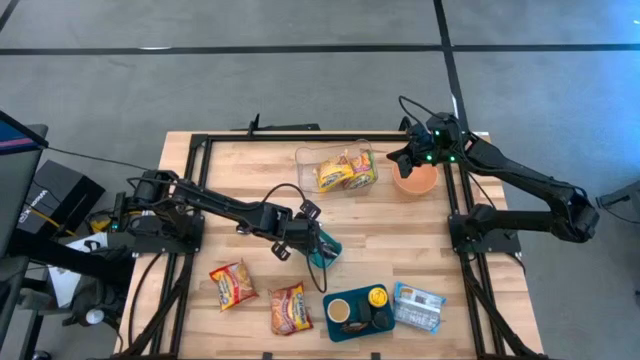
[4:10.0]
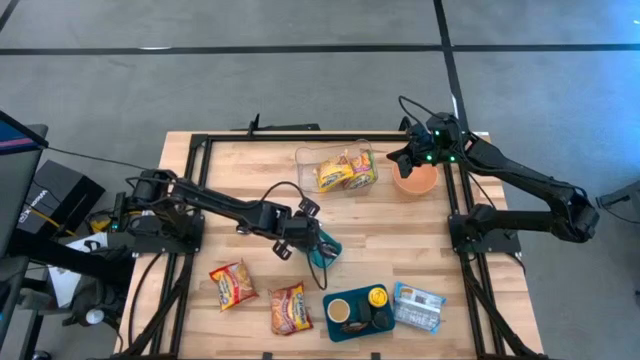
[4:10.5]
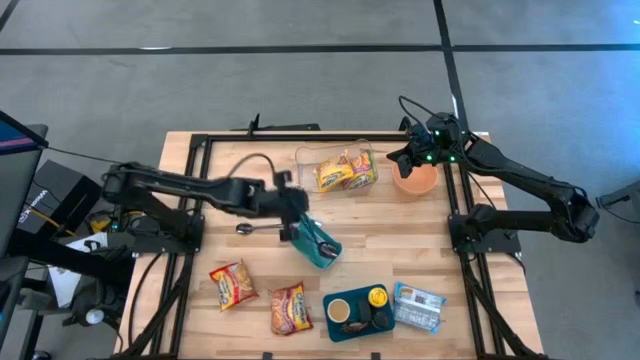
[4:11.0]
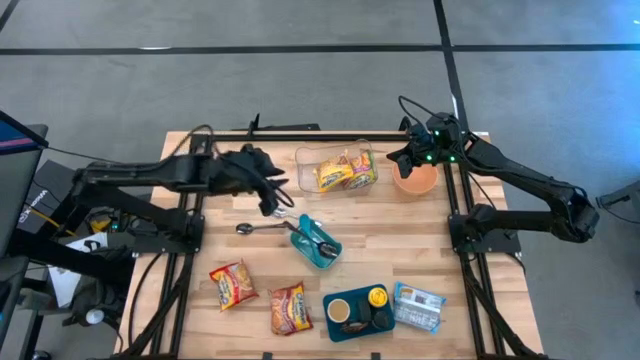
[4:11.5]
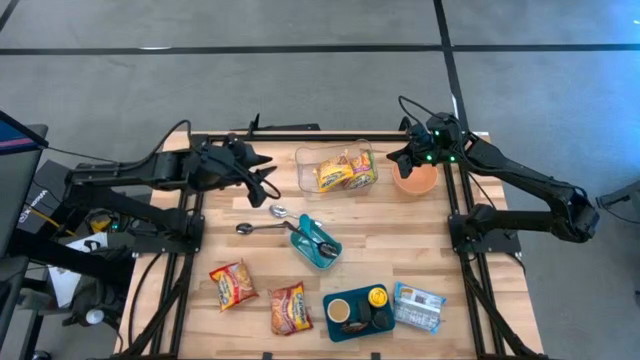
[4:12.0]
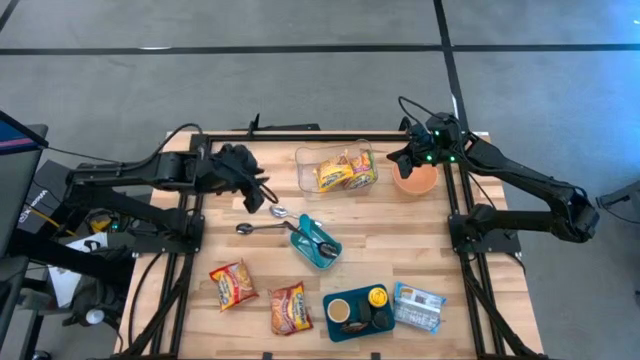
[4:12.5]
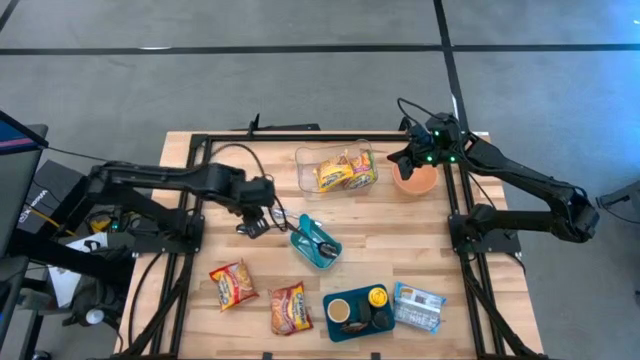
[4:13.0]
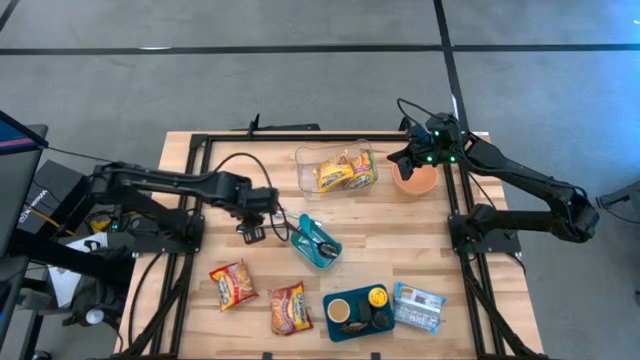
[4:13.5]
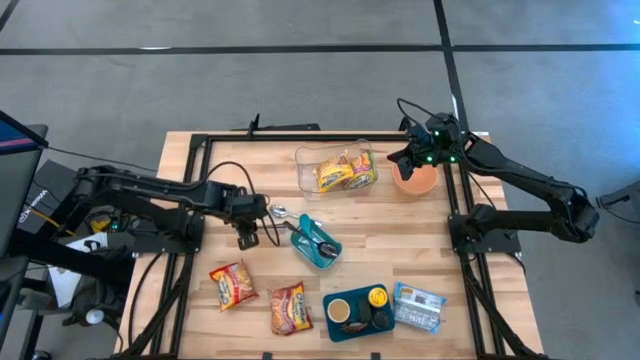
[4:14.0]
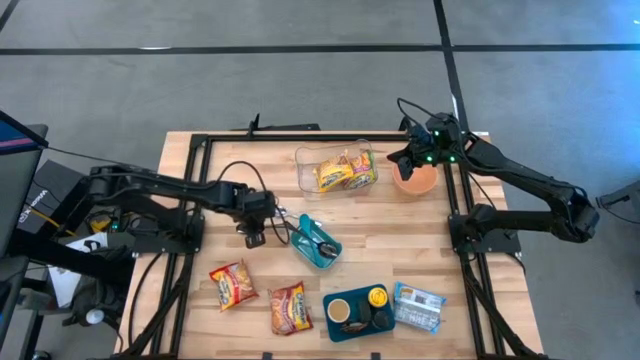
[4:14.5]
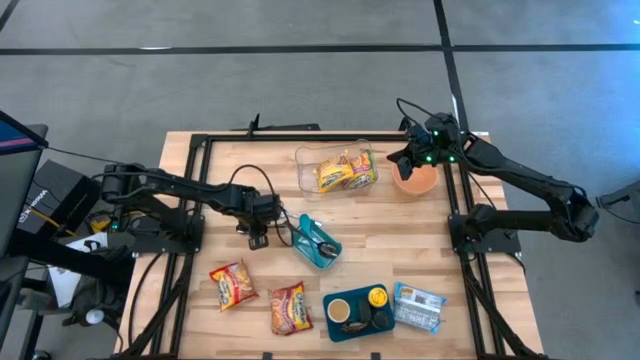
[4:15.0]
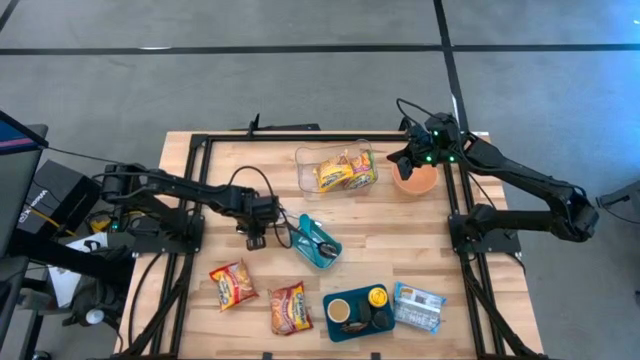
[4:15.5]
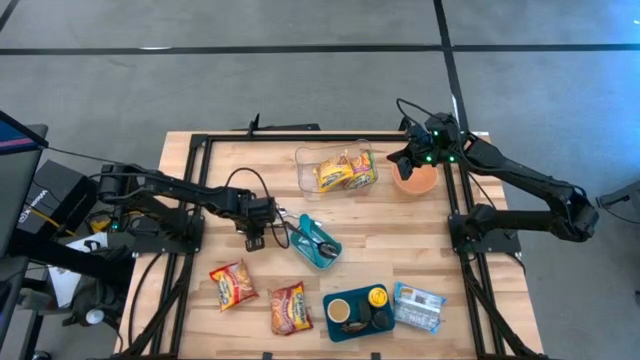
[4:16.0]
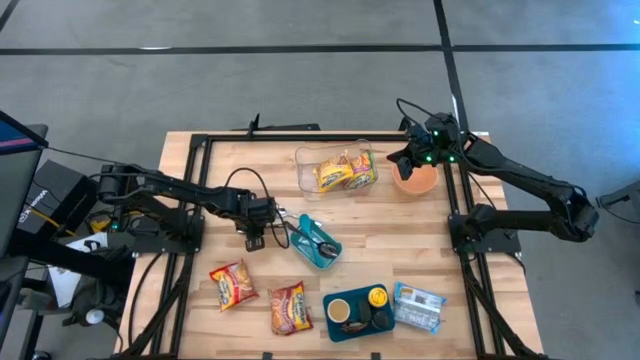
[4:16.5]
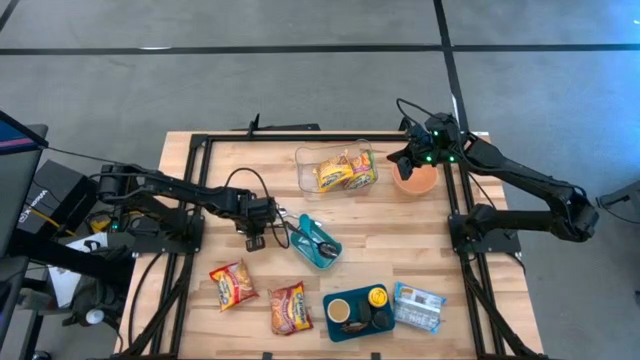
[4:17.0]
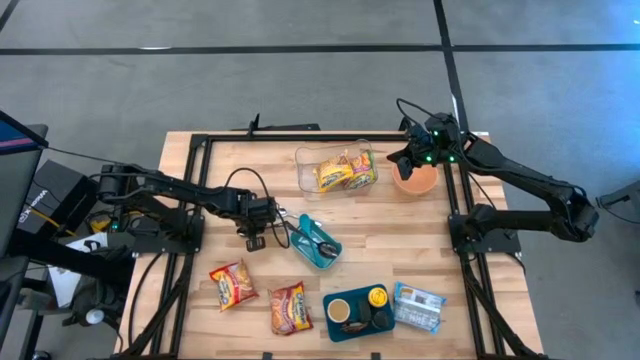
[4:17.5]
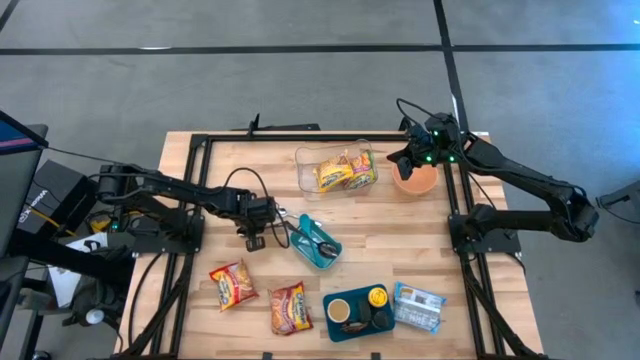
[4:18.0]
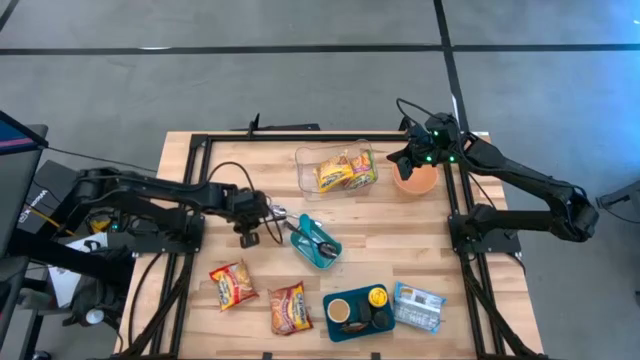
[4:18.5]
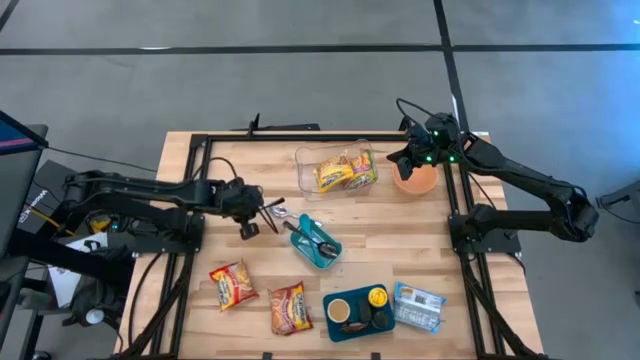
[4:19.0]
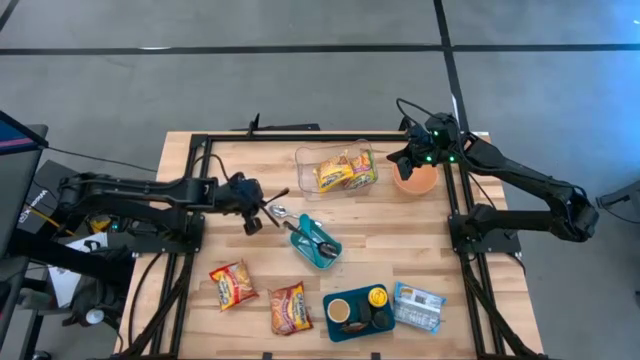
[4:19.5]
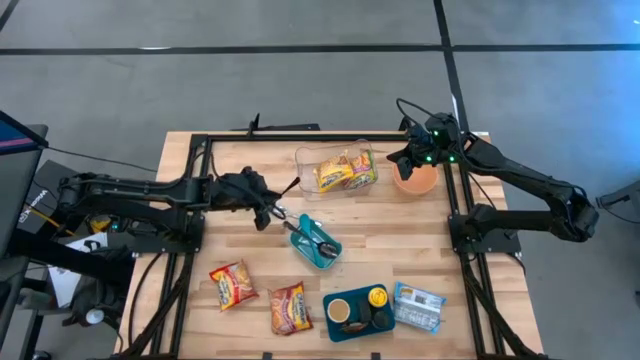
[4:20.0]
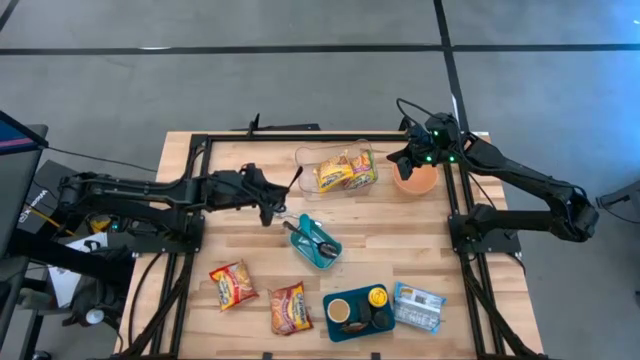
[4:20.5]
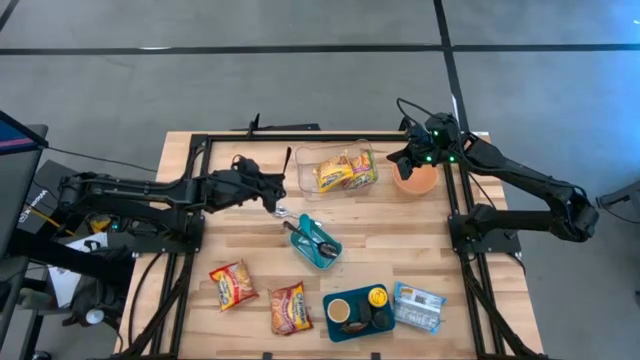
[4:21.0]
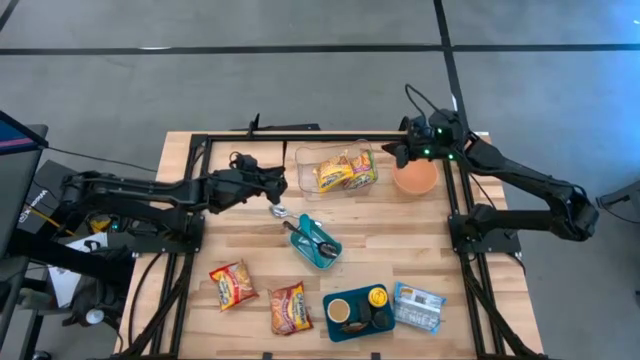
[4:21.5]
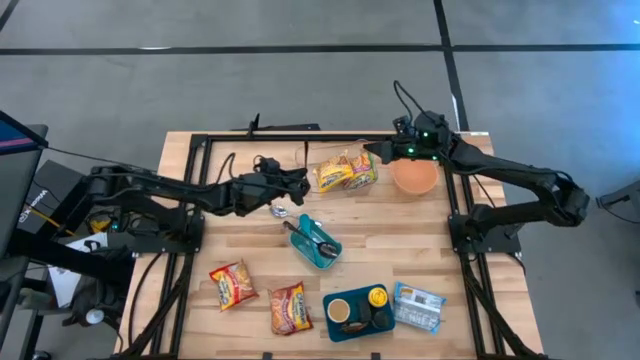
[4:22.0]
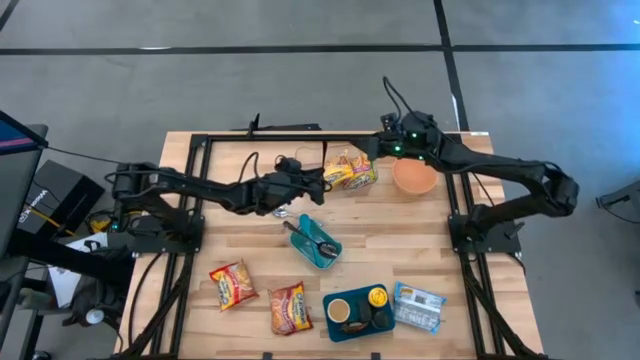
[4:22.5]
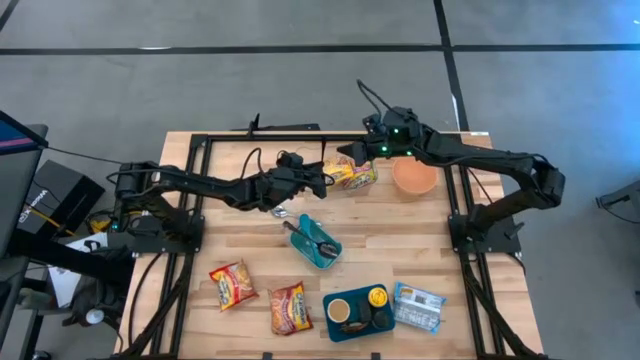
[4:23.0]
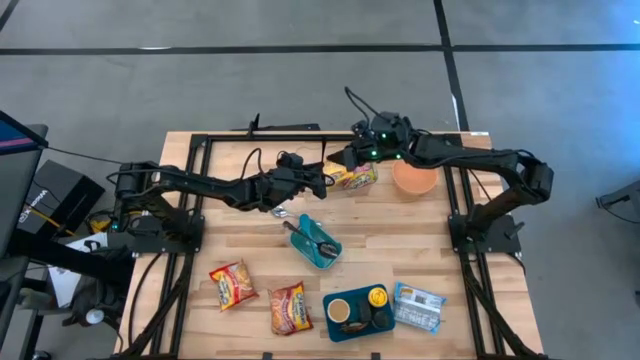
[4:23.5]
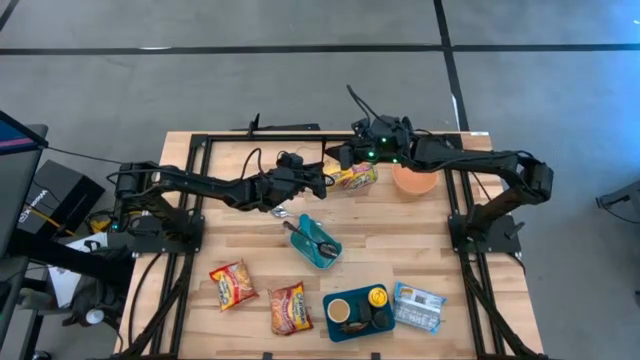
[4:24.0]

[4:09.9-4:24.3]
Task: Pick & Place Food Item
Put the black spoon into the green bin

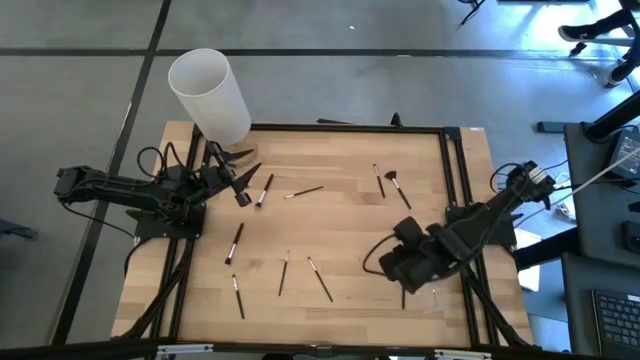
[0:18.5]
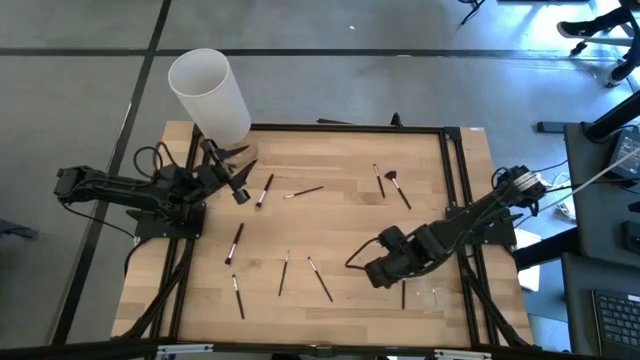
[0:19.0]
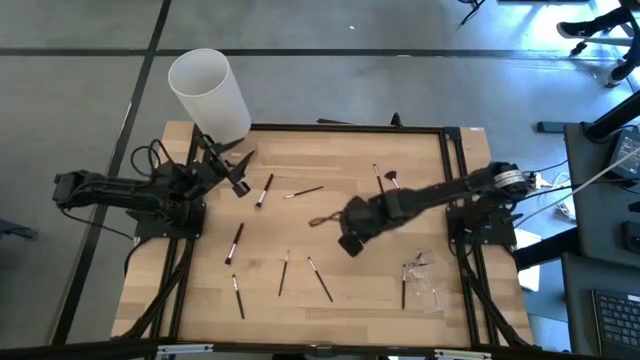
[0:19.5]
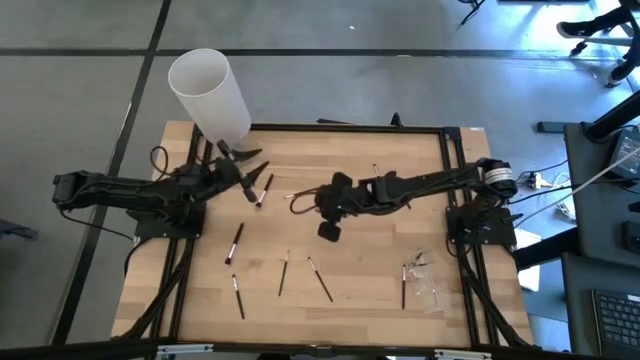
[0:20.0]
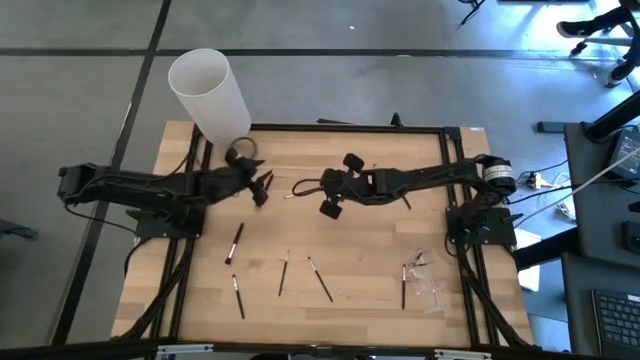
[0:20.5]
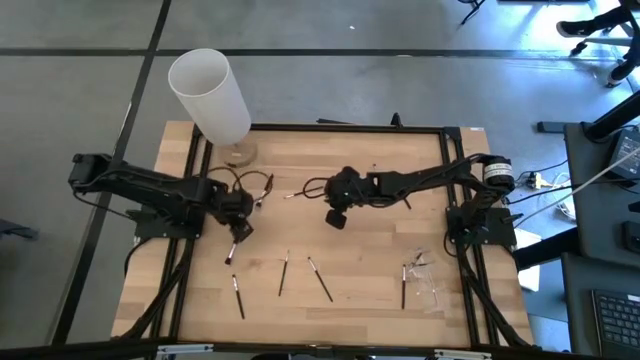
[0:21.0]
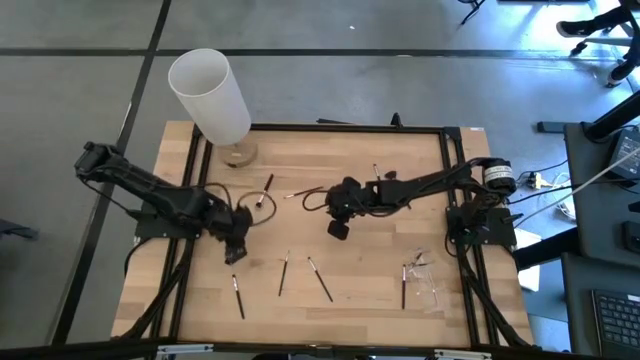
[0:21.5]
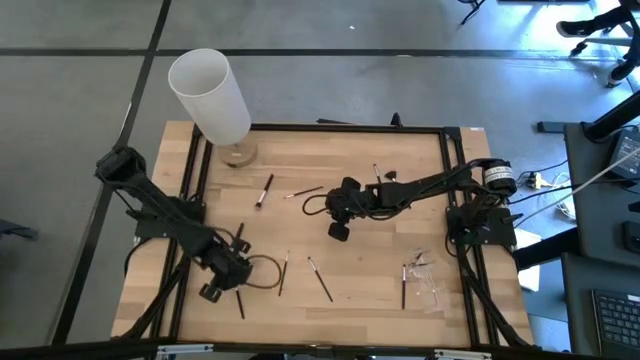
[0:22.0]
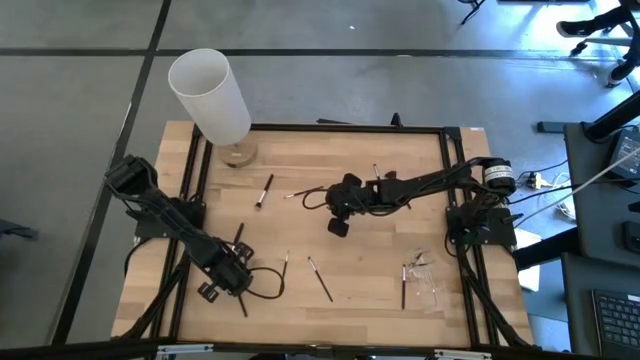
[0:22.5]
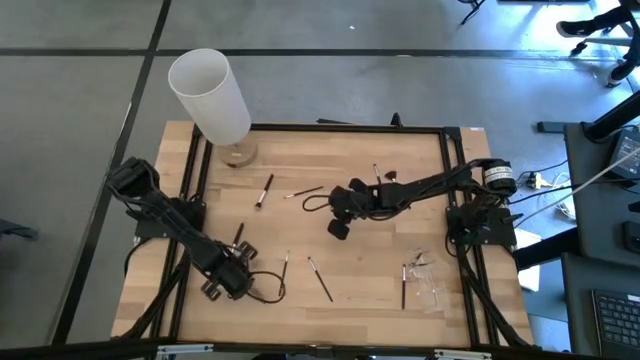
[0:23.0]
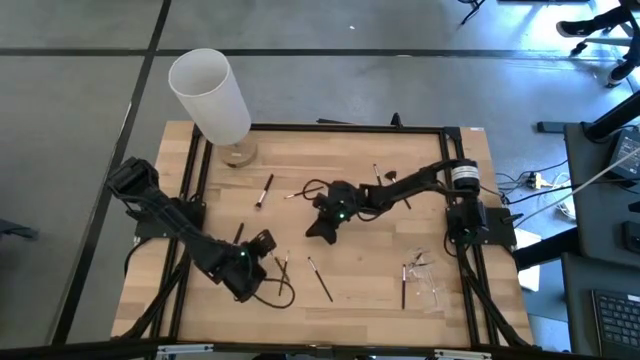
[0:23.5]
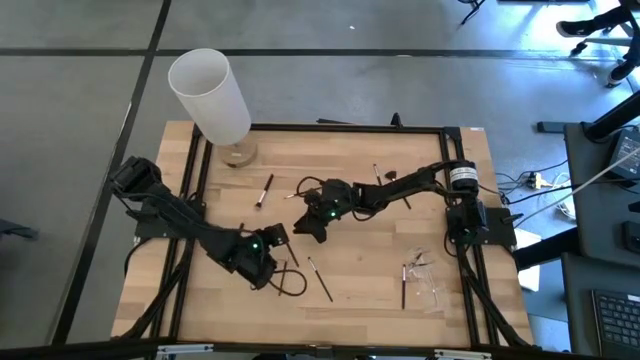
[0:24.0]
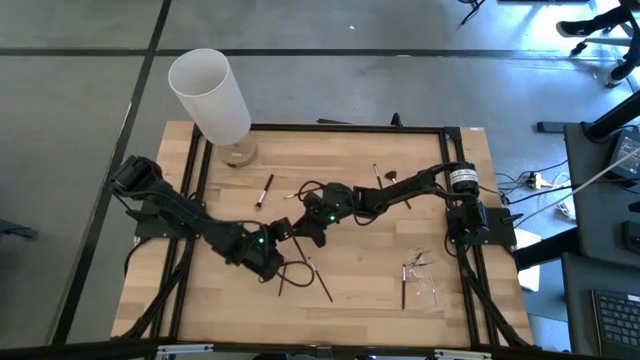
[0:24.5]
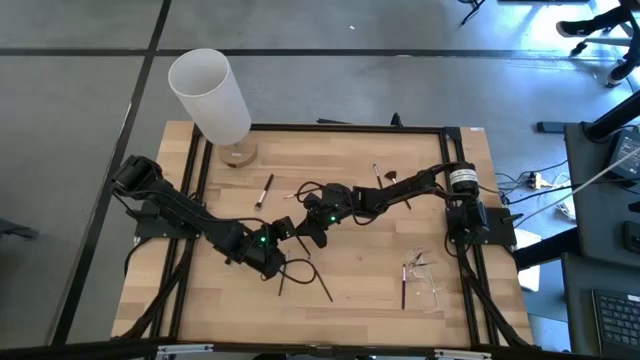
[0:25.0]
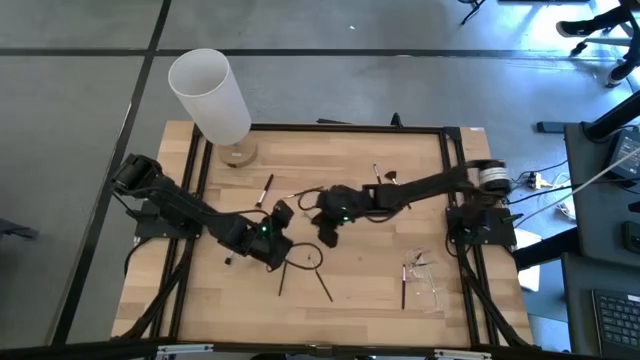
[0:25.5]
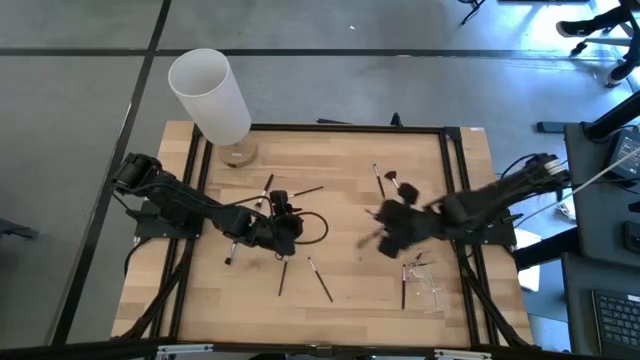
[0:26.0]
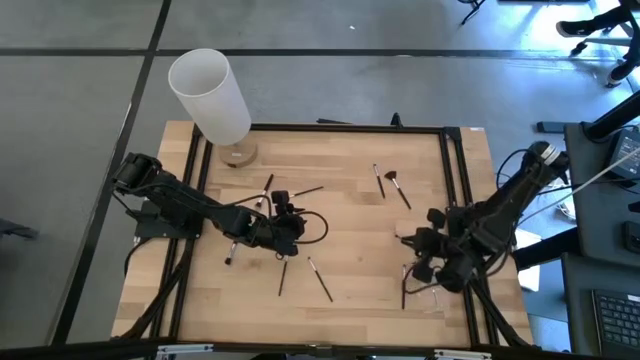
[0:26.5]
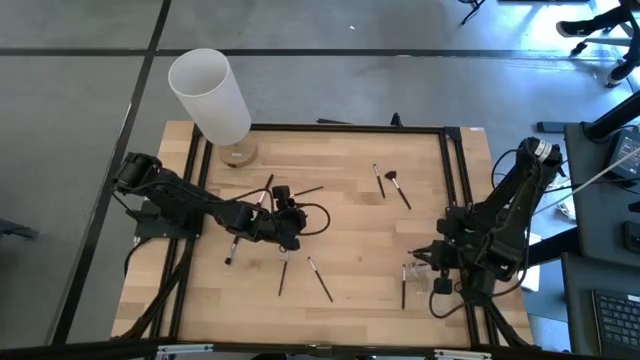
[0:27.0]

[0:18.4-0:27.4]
Task: Put items in baskets/containers
Put the black eyeshadow brush into the transparent organizer
